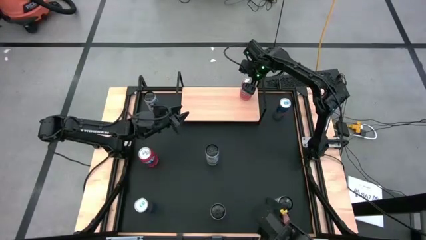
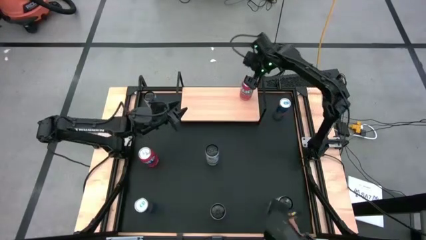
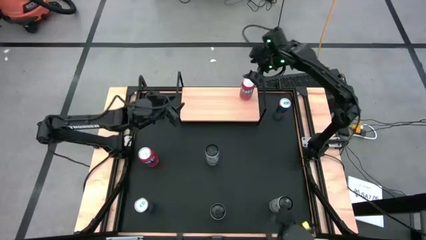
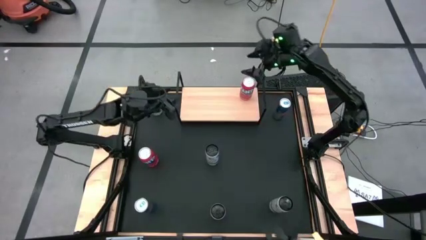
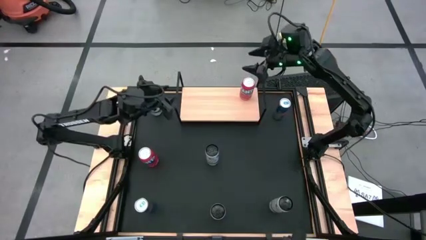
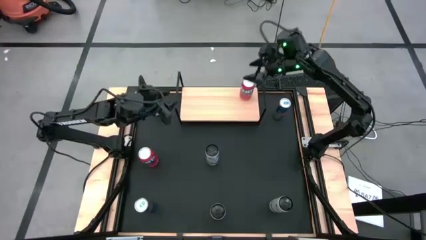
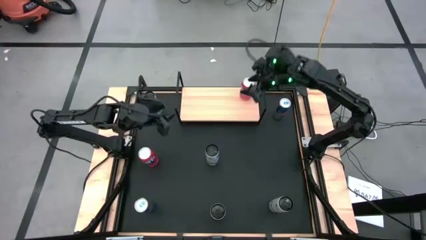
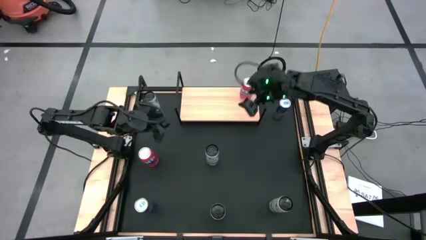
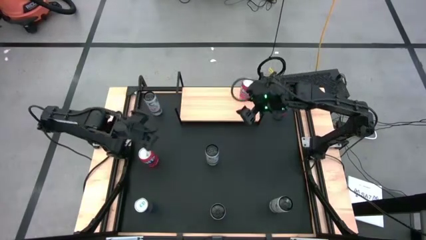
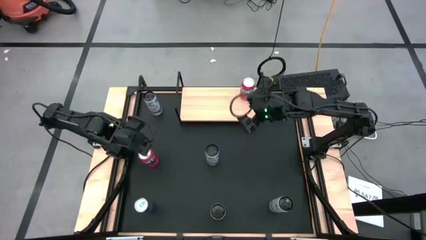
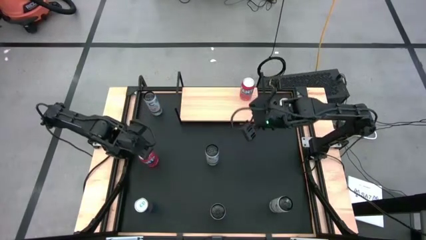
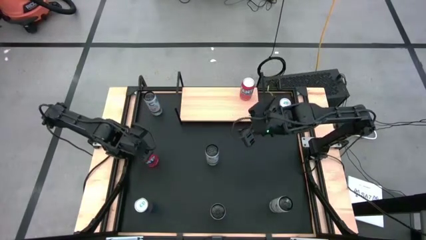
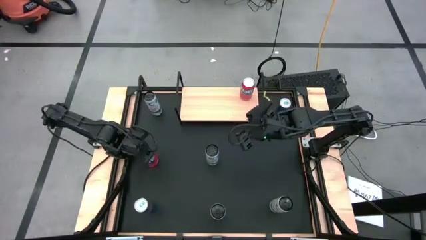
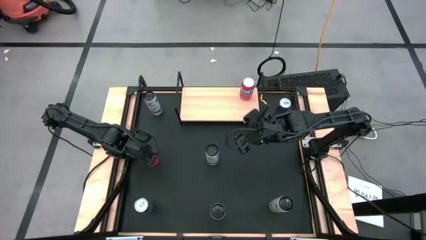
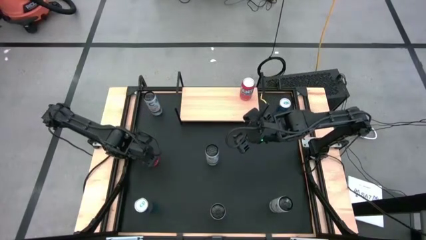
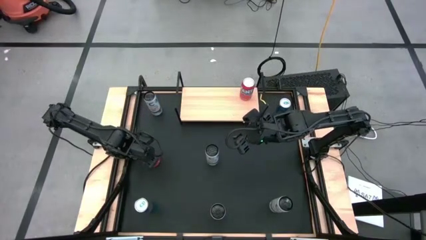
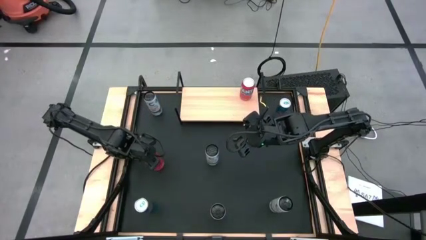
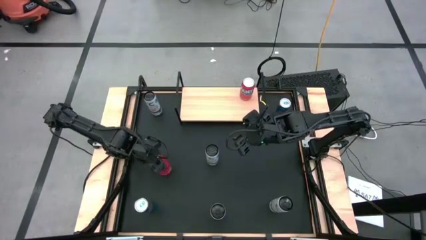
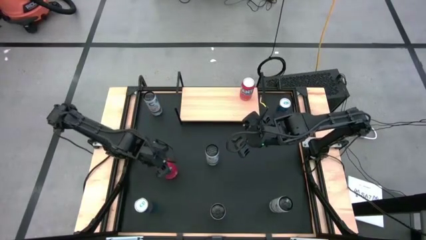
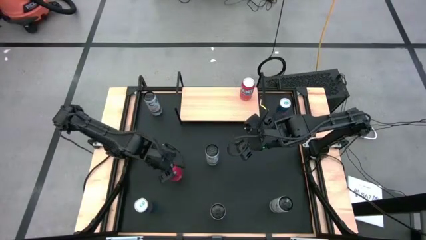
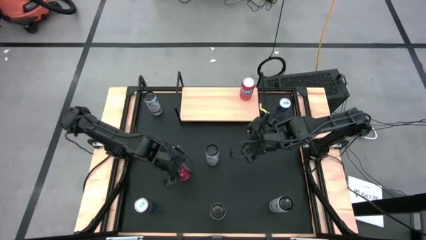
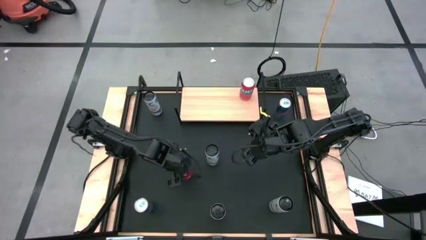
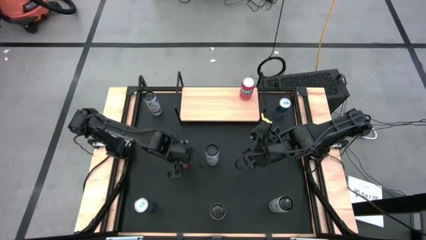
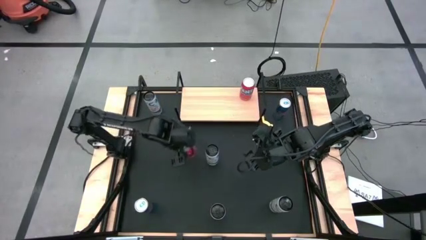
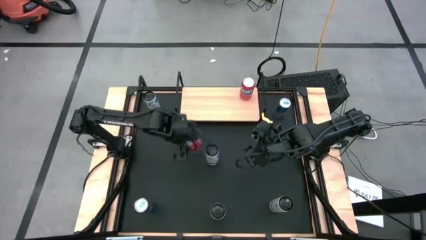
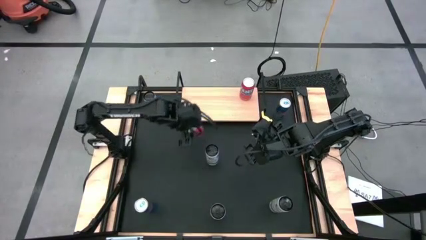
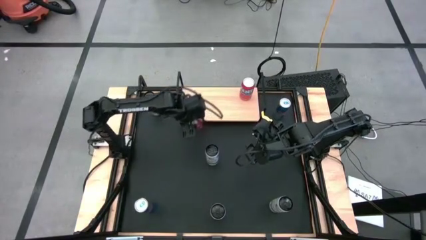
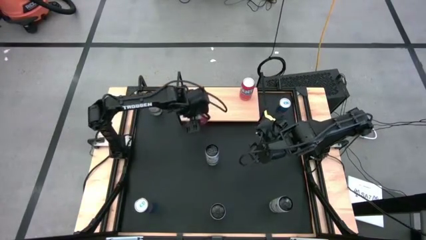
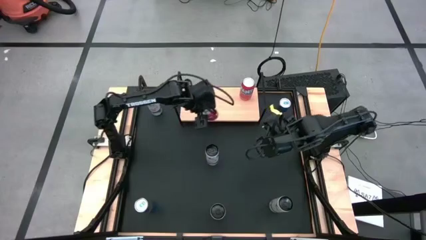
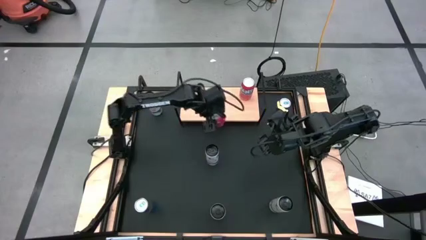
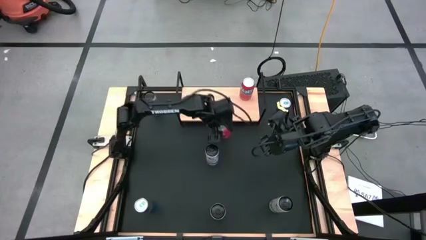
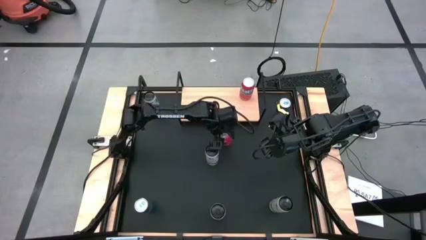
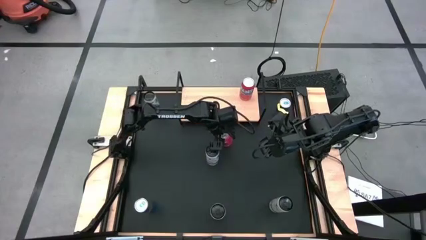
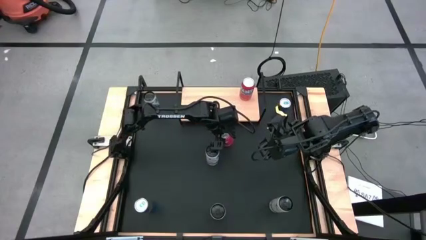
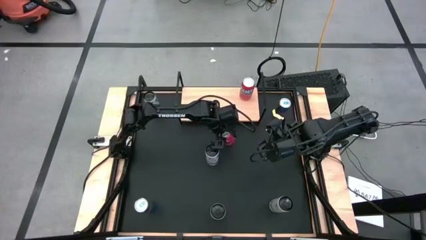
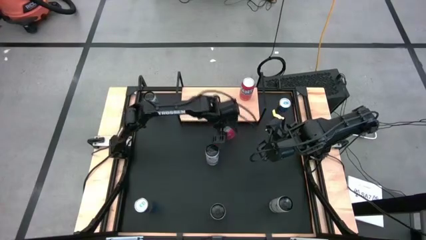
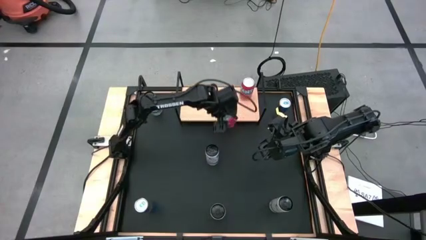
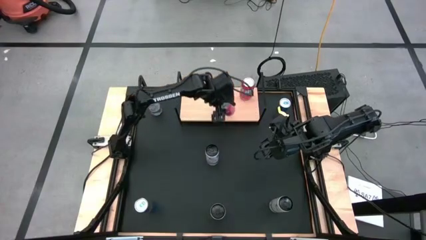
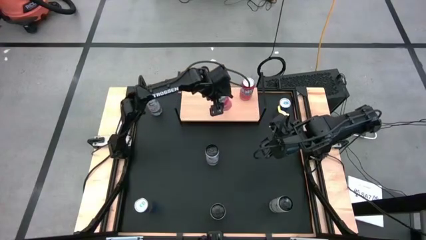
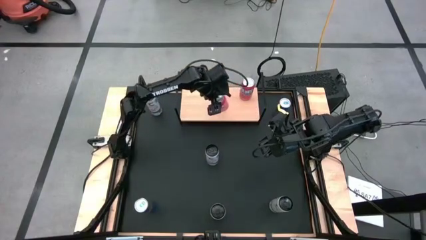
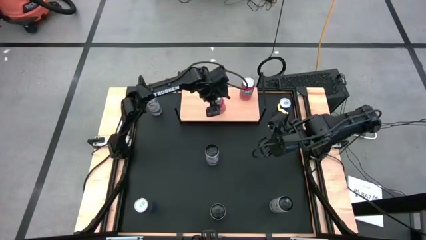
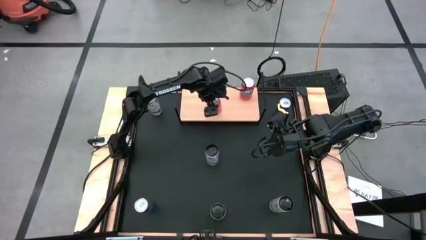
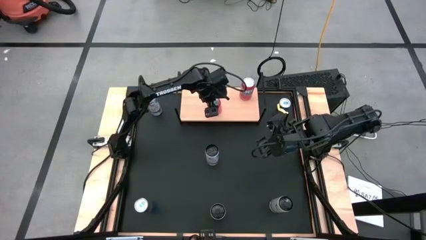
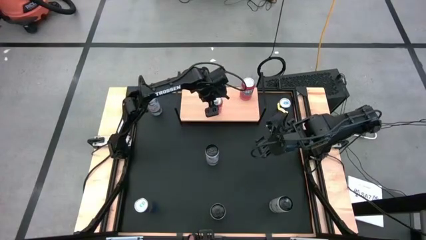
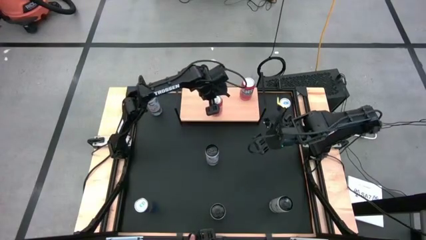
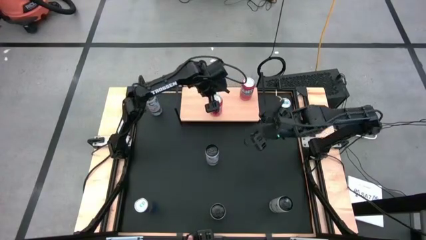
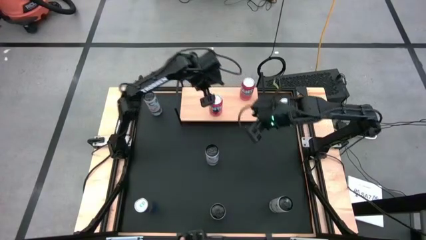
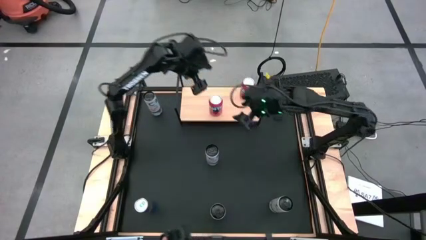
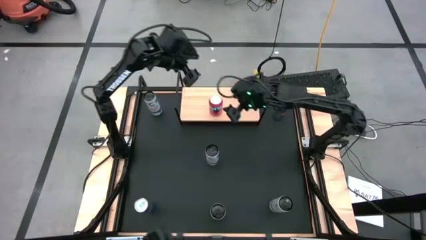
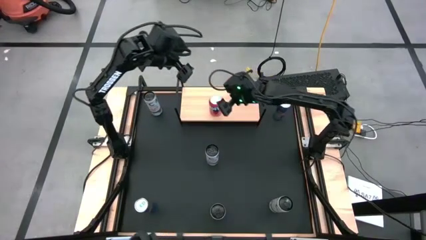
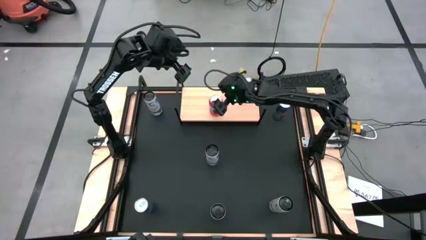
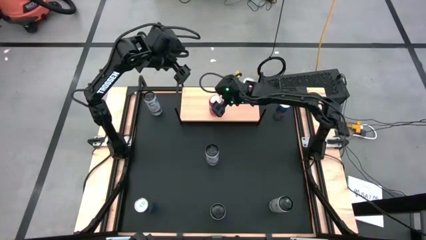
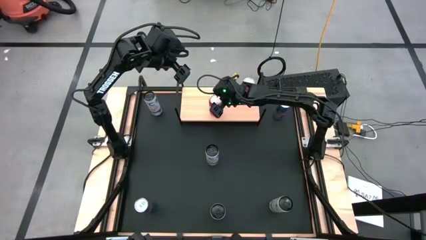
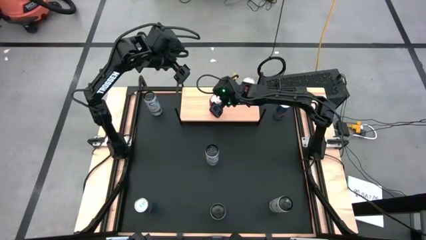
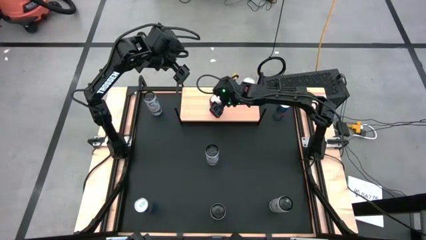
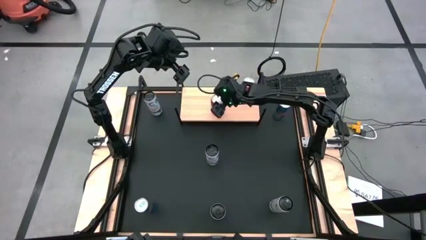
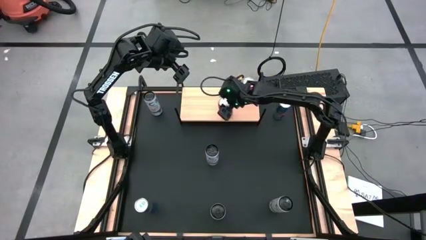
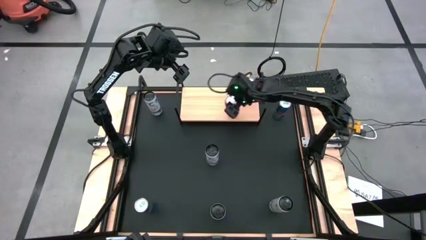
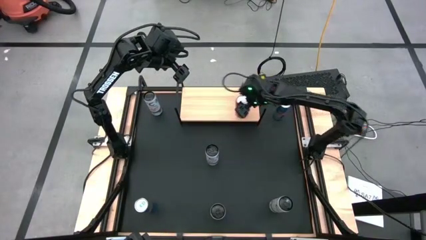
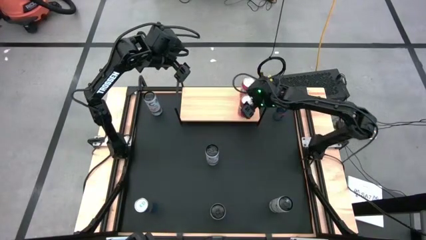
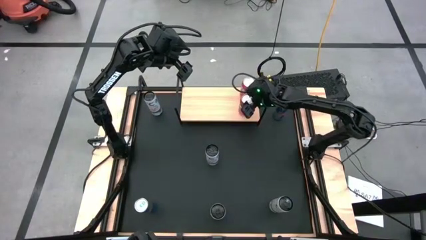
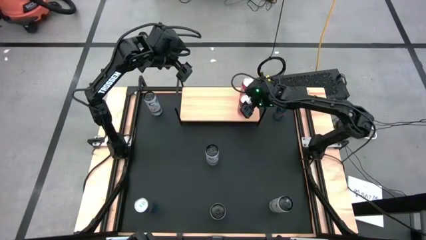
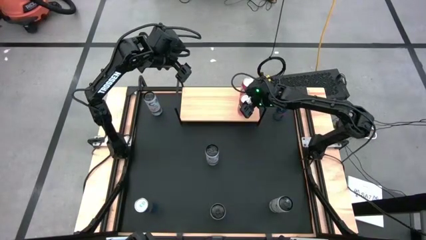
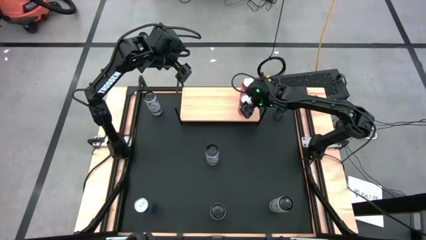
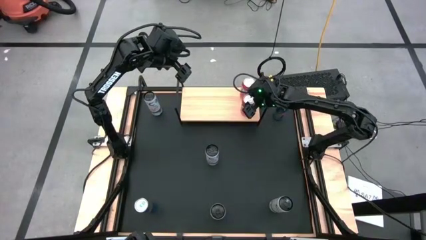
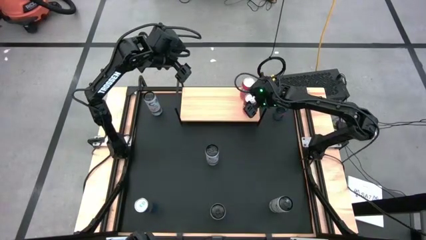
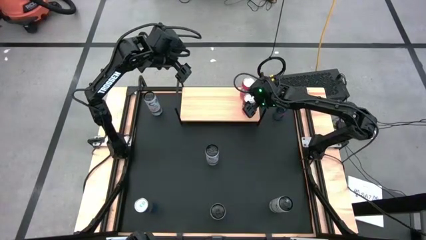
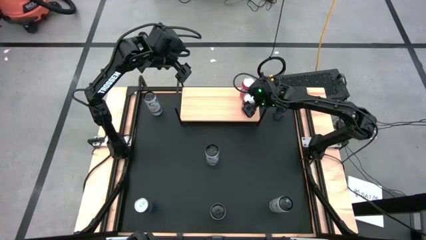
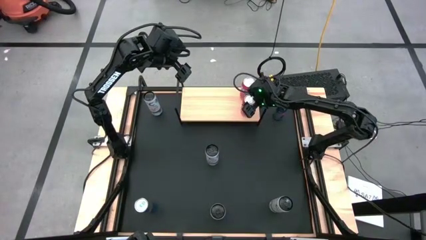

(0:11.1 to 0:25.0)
Task: Place canned beverage on shelf
Put the red soda can on the shelf aligned with the other red soda can
